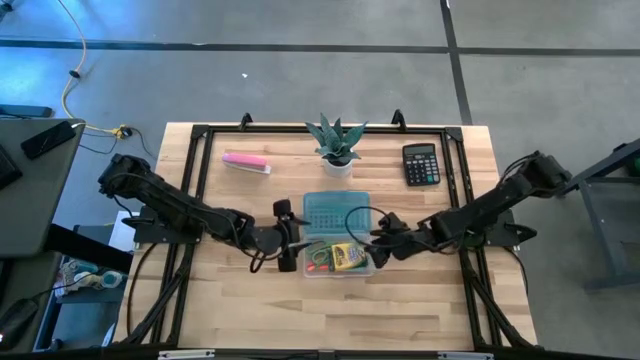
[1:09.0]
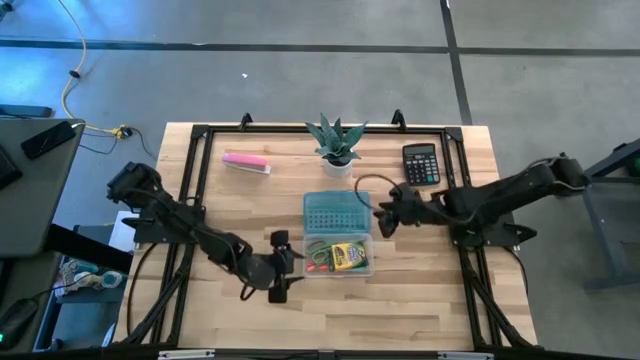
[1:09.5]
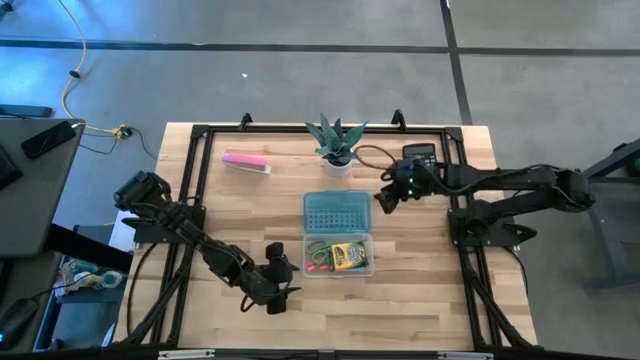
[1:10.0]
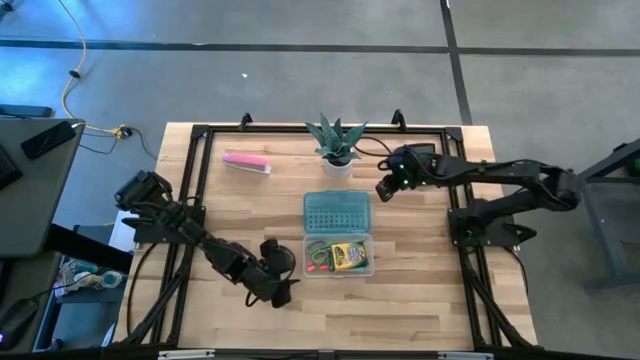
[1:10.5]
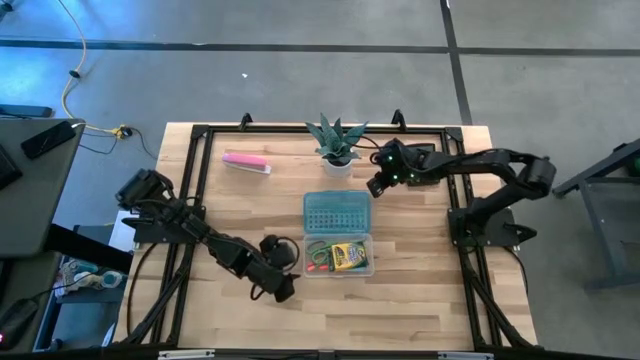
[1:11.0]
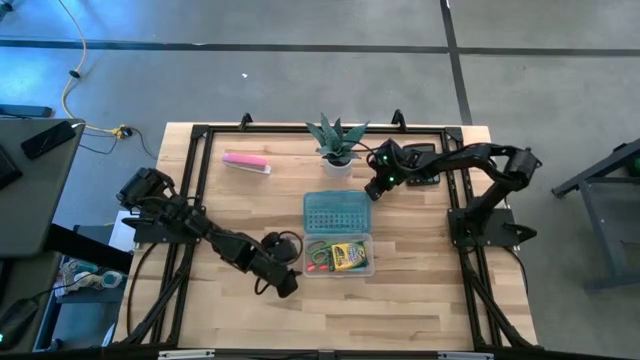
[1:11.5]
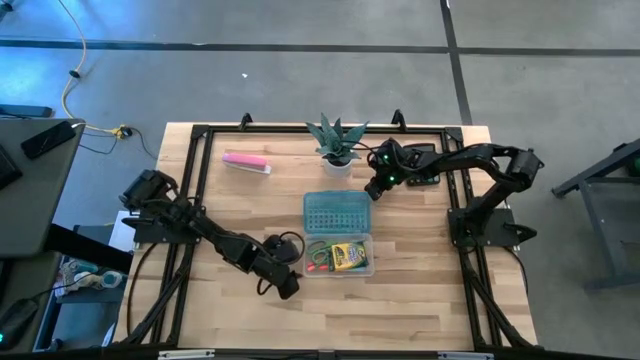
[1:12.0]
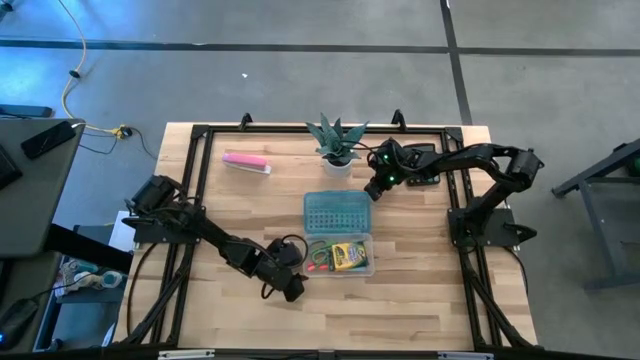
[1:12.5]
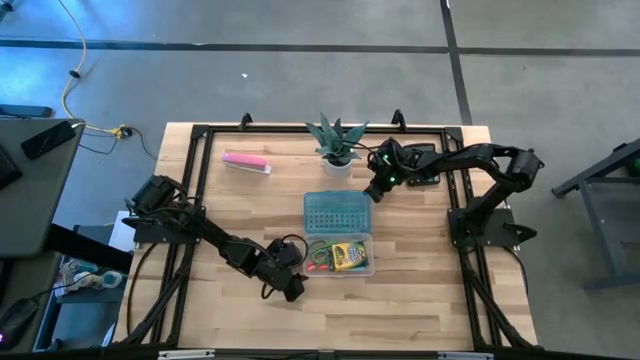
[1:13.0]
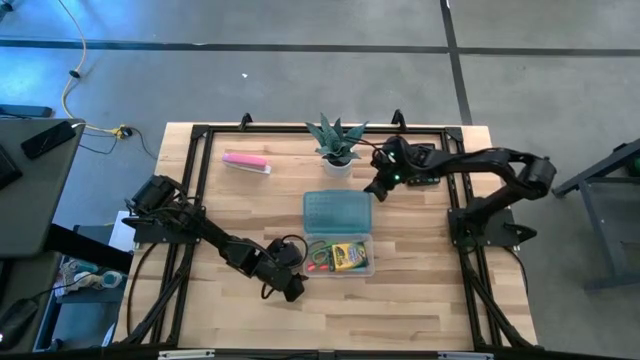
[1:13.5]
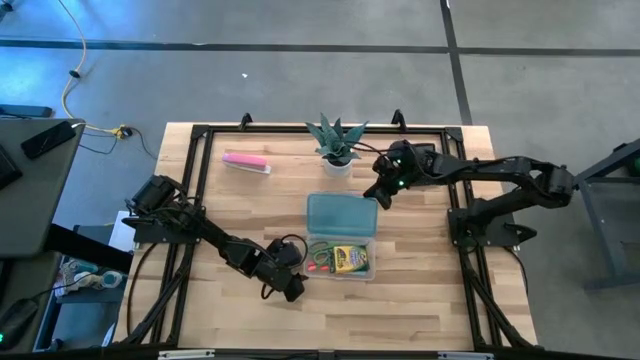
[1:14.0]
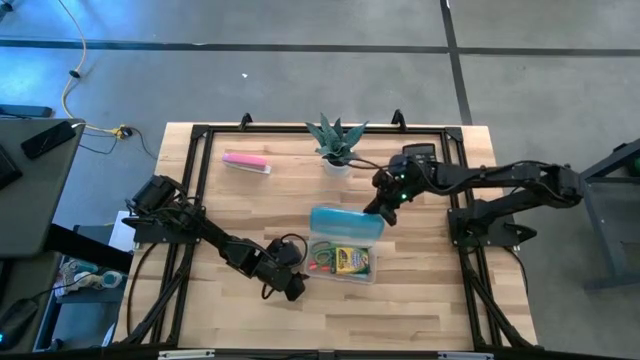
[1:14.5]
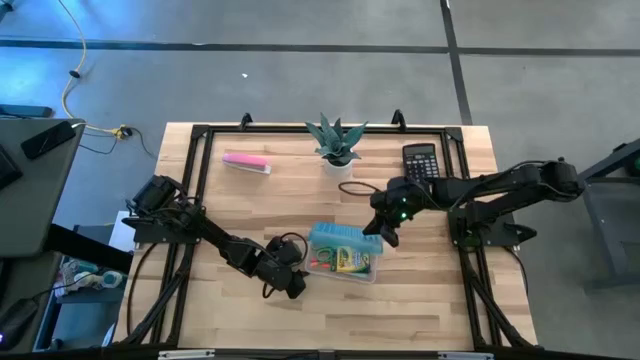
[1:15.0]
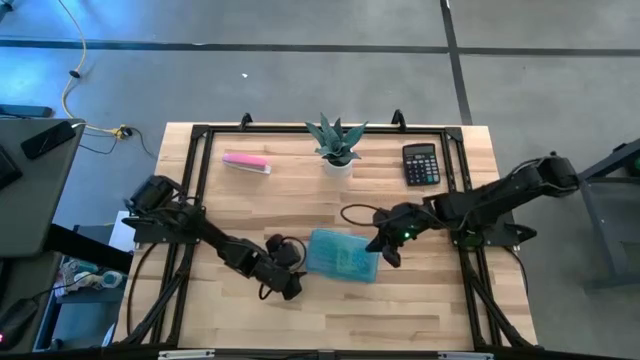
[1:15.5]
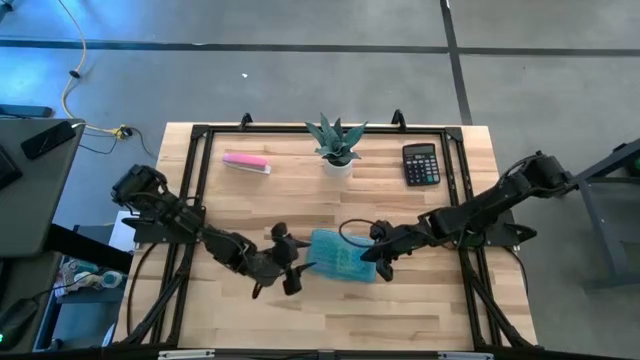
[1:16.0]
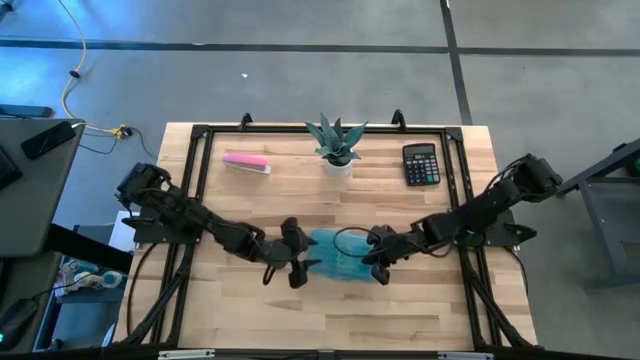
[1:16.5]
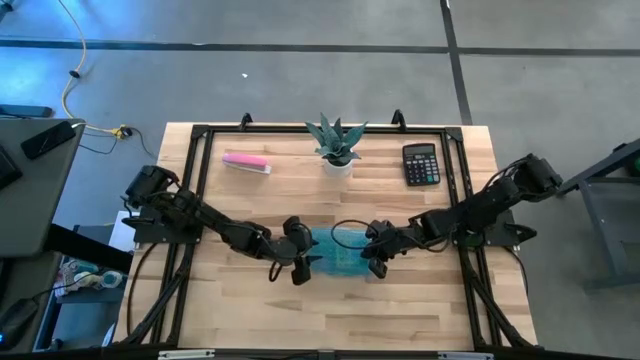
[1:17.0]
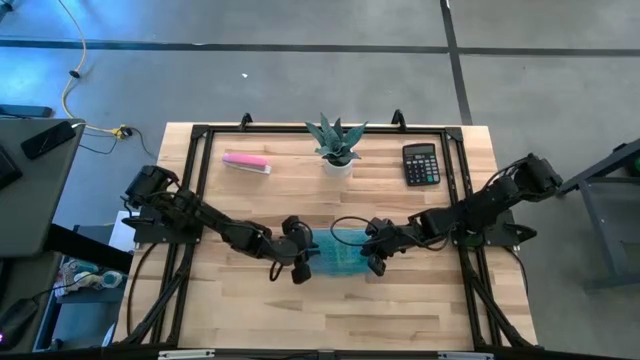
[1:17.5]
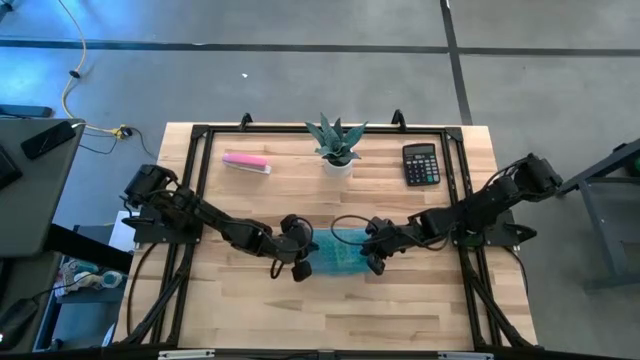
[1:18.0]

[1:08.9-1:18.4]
Task: Pack school essentials
Close the blue supply box

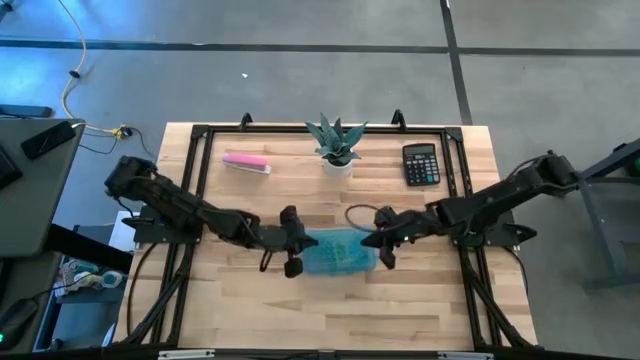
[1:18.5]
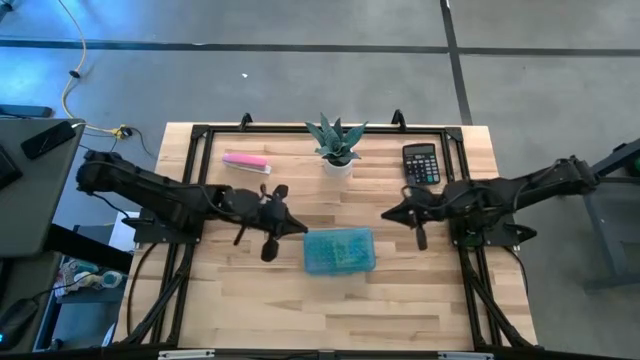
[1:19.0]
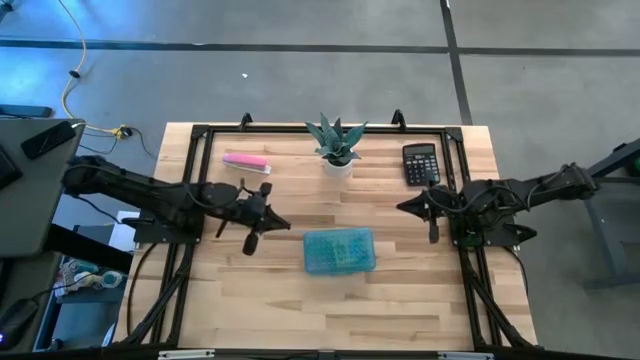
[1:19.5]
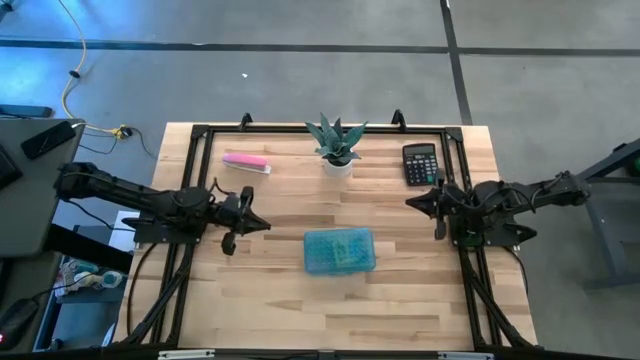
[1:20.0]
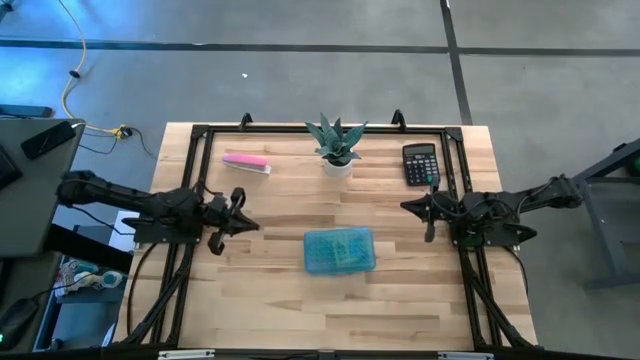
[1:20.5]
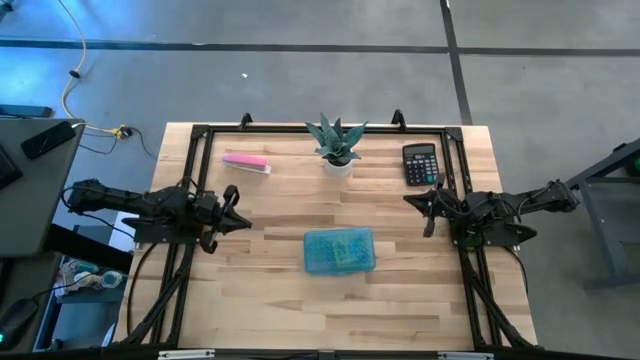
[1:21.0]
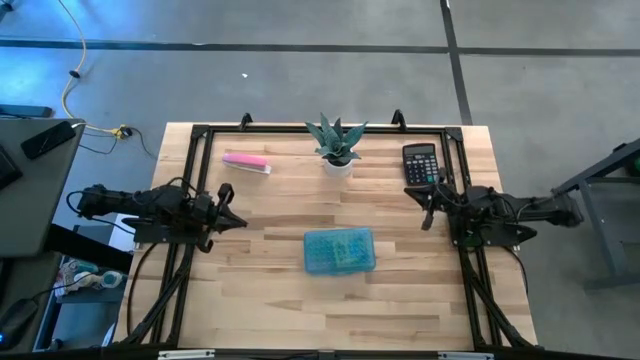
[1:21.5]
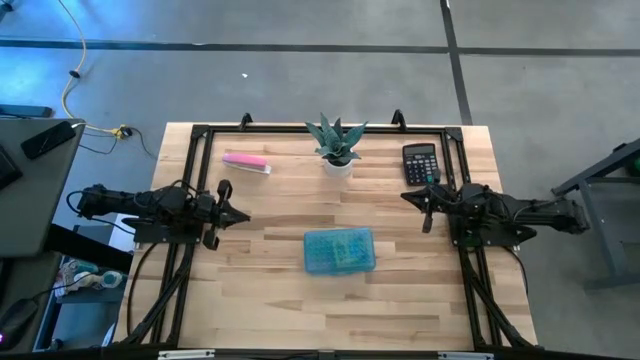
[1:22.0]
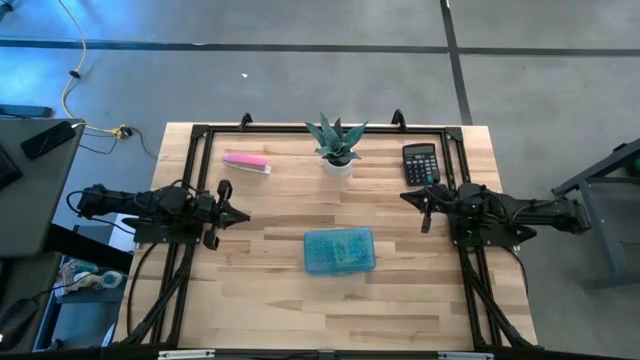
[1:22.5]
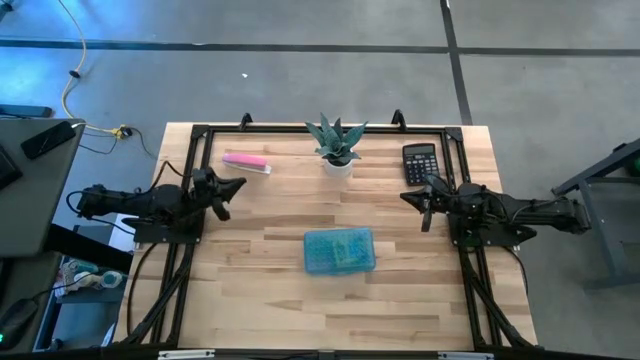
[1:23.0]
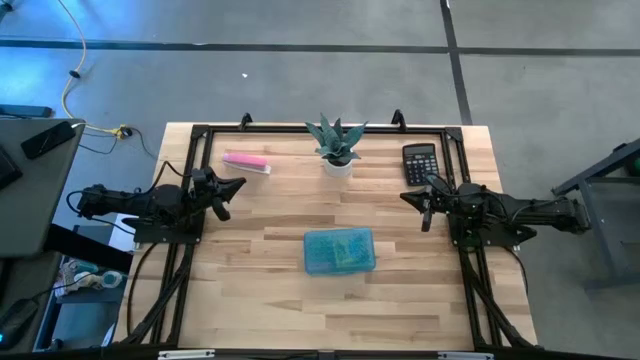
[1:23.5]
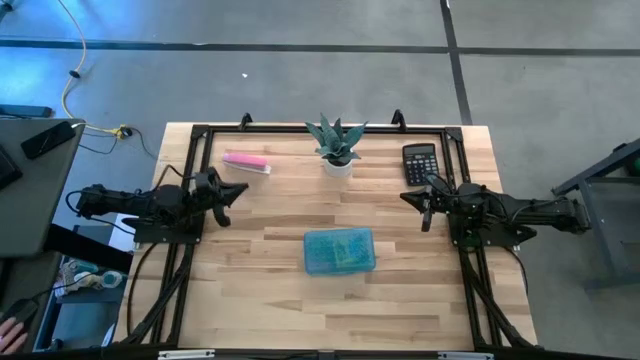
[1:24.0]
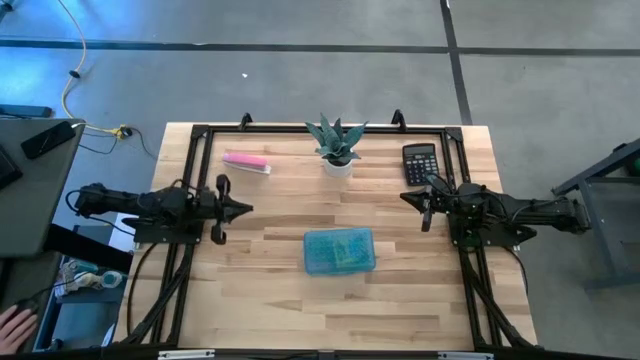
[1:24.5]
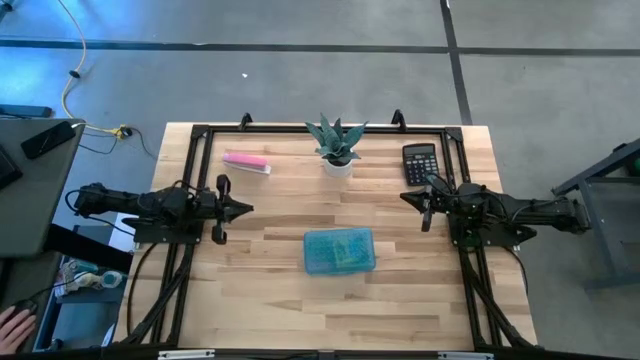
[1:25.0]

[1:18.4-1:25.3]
Return to Home Position

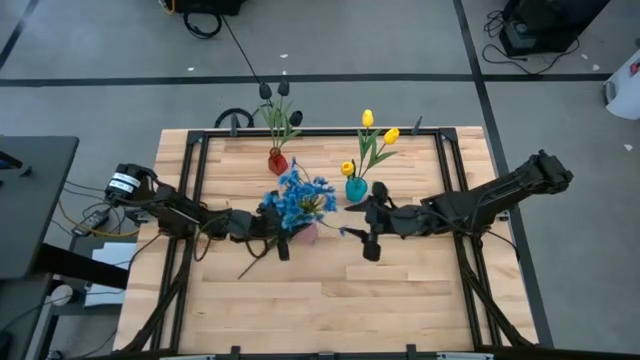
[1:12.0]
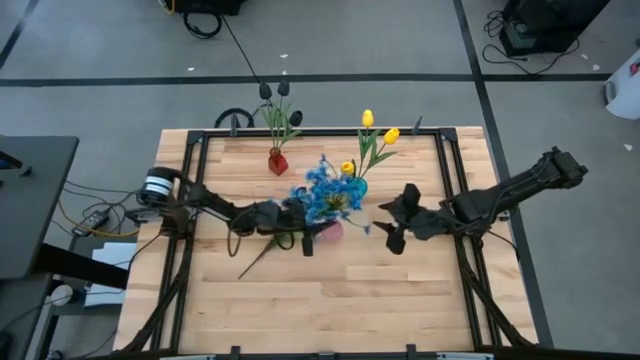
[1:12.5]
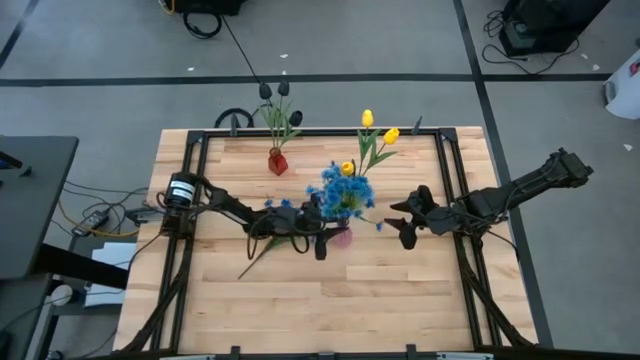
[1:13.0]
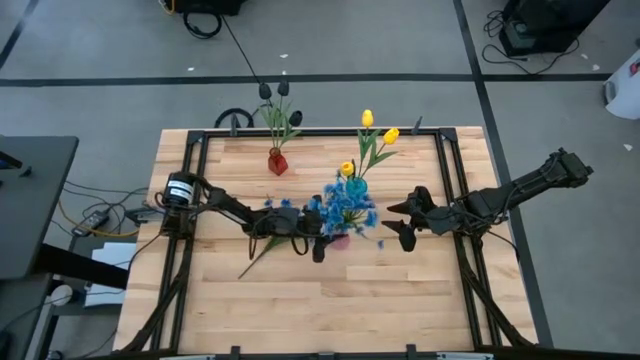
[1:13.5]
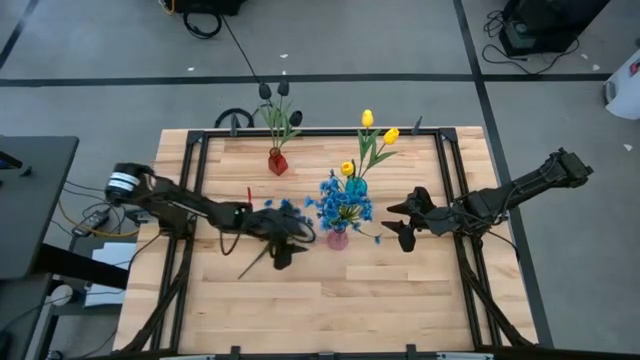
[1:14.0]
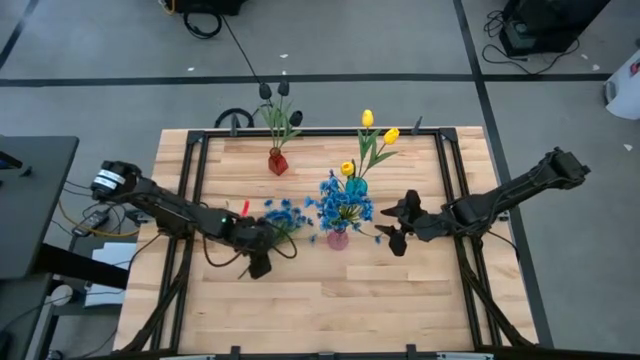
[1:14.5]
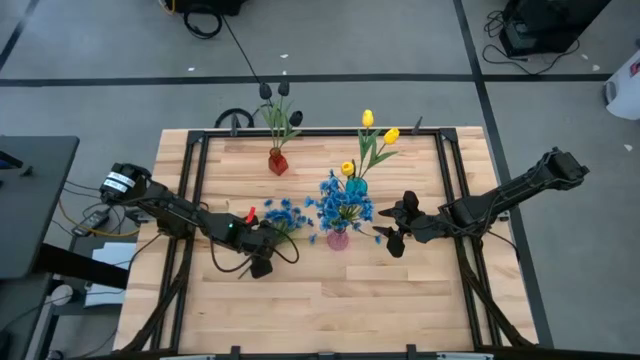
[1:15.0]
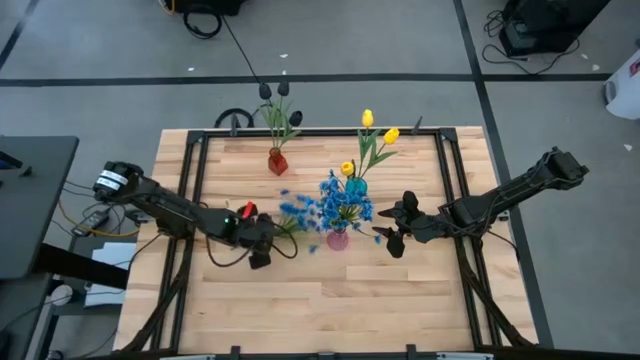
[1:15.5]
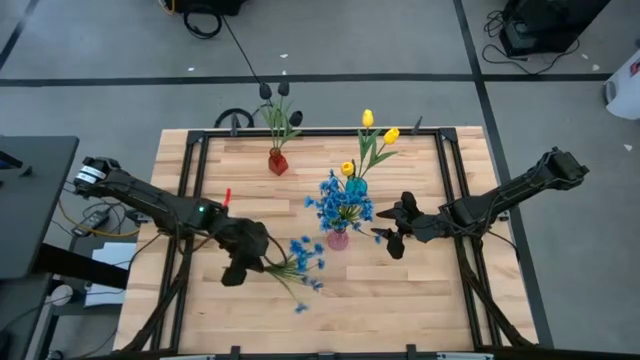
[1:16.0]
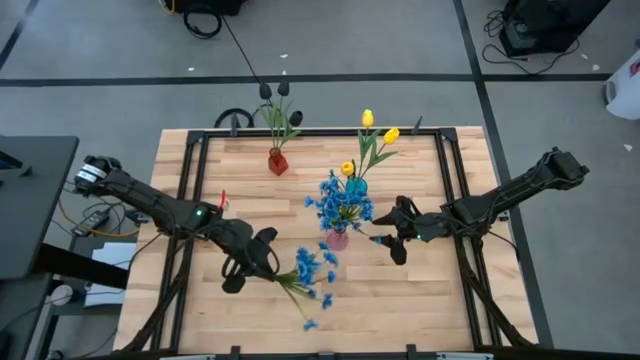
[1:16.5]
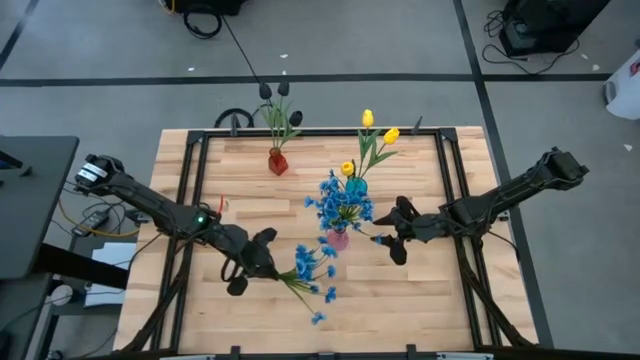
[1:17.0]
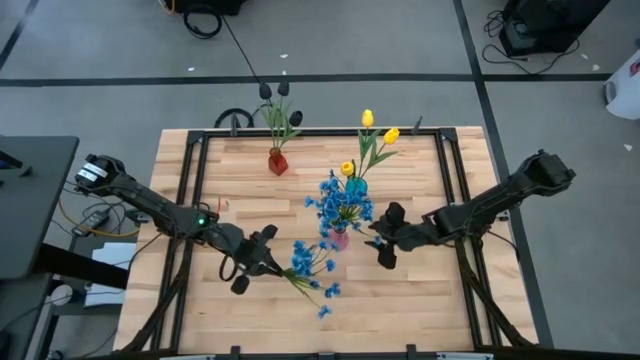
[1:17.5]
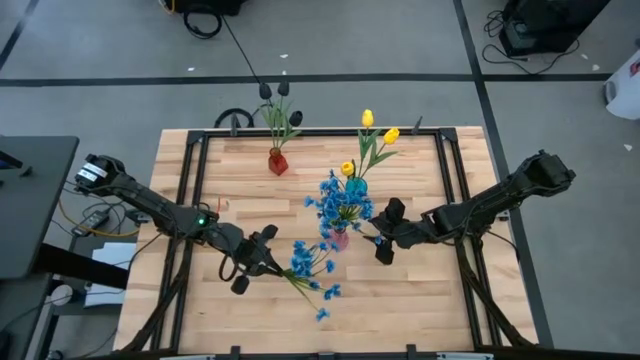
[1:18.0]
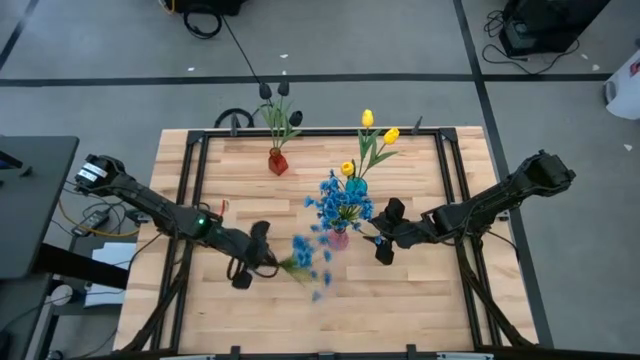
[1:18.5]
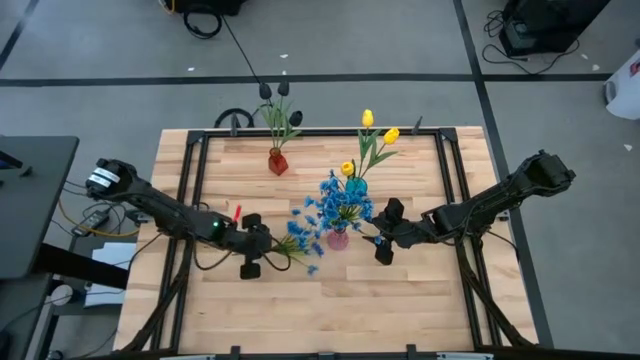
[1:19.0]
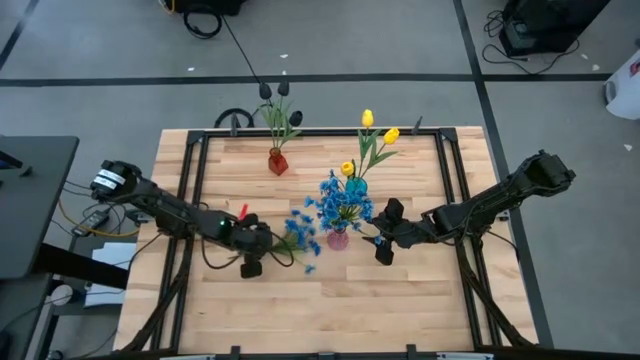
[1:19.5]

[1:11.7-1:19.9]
Task: Sort flowers into vase by color
Put the blue flowers into the violet vase
